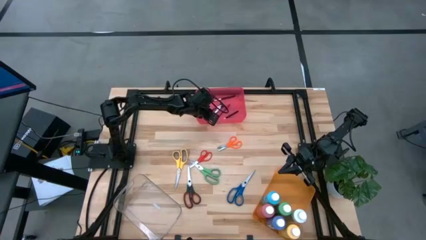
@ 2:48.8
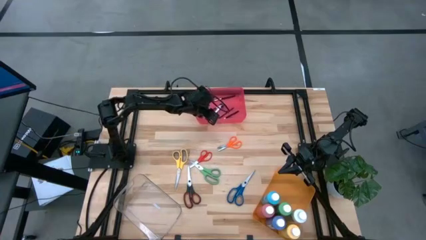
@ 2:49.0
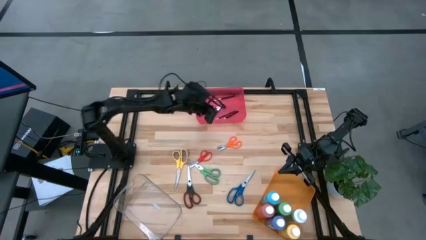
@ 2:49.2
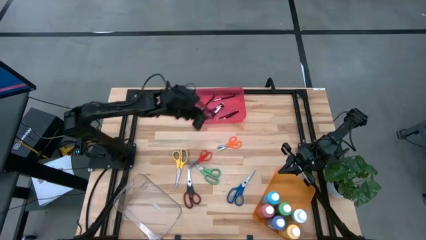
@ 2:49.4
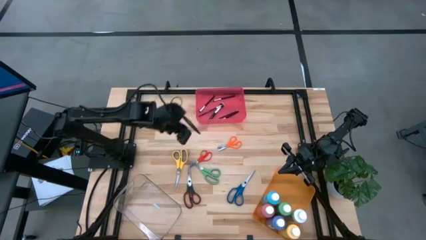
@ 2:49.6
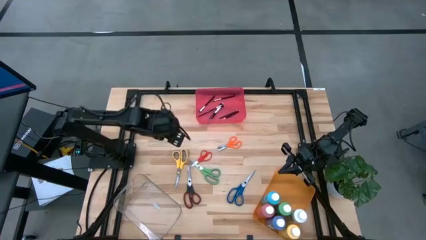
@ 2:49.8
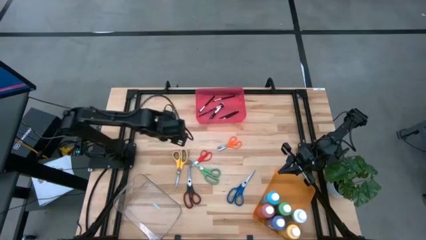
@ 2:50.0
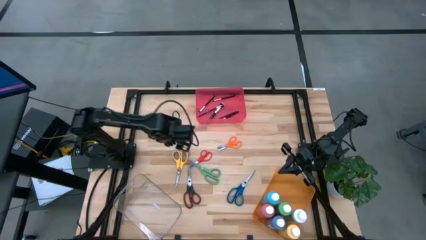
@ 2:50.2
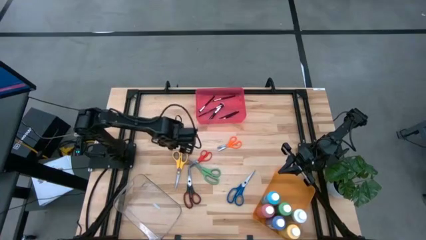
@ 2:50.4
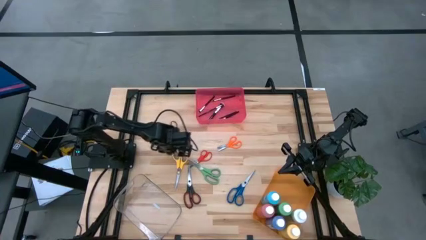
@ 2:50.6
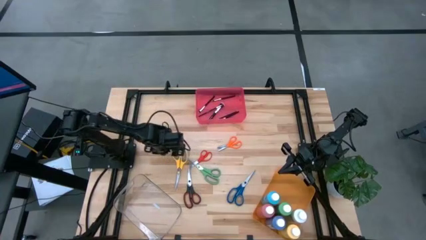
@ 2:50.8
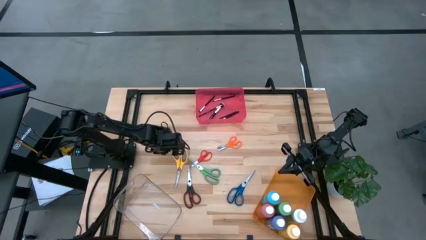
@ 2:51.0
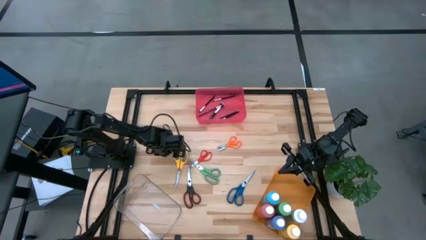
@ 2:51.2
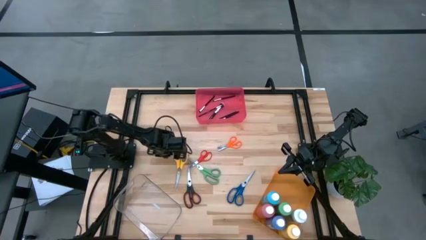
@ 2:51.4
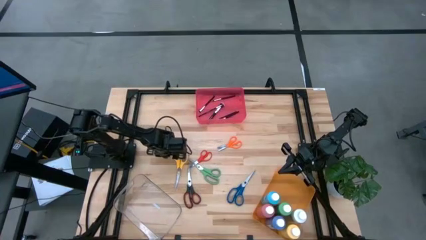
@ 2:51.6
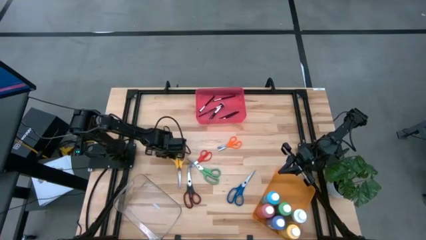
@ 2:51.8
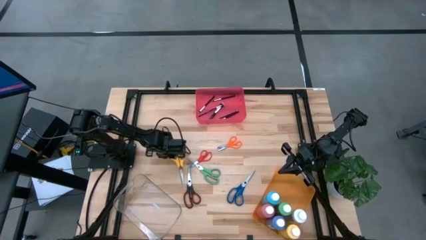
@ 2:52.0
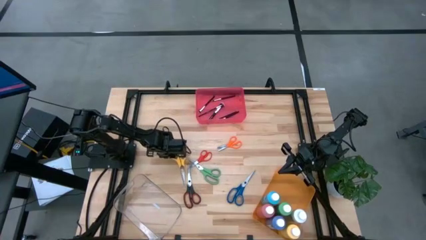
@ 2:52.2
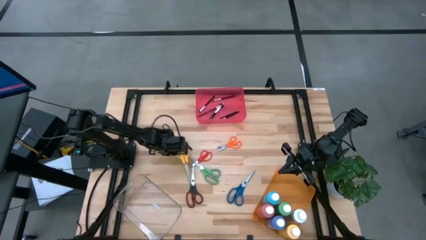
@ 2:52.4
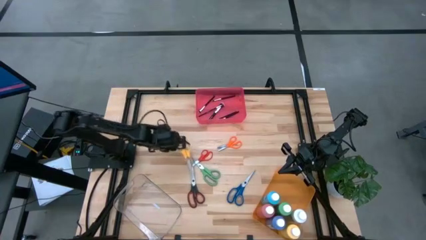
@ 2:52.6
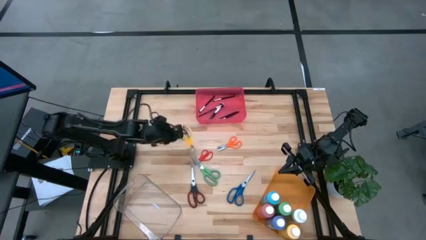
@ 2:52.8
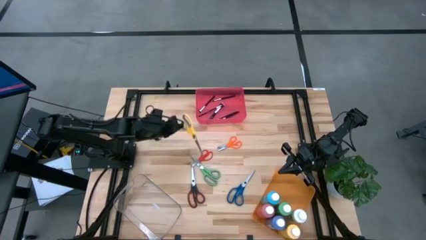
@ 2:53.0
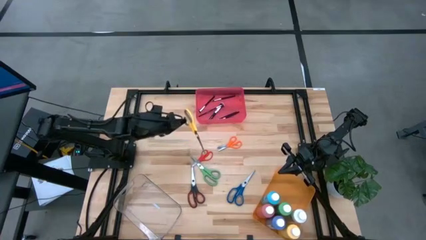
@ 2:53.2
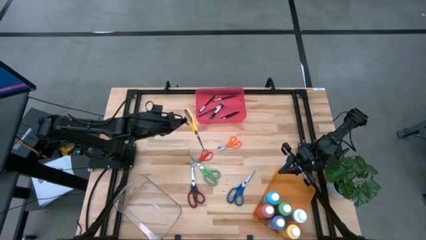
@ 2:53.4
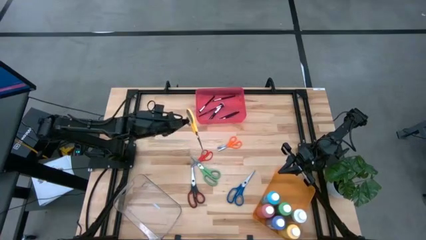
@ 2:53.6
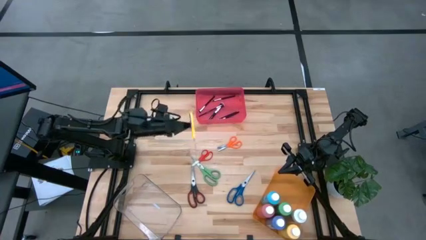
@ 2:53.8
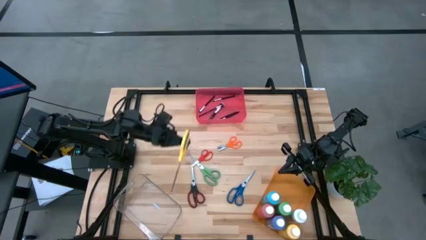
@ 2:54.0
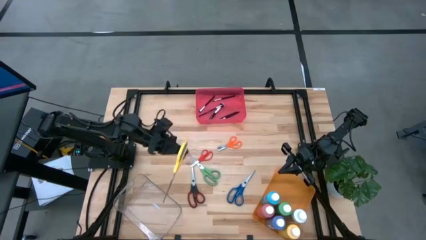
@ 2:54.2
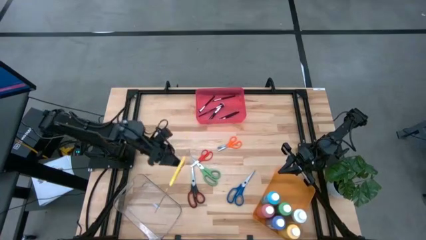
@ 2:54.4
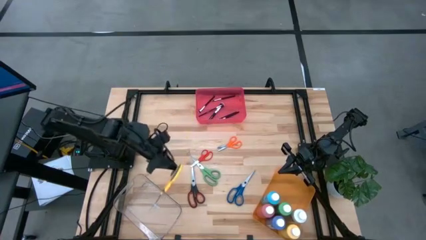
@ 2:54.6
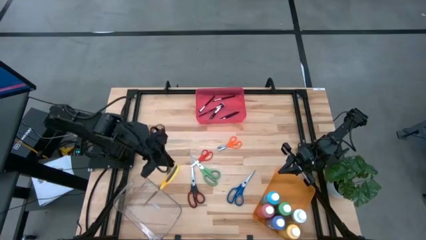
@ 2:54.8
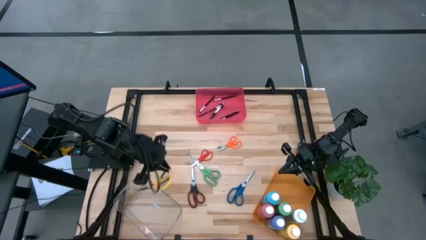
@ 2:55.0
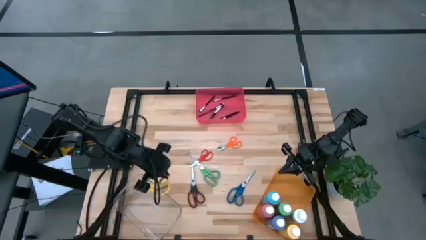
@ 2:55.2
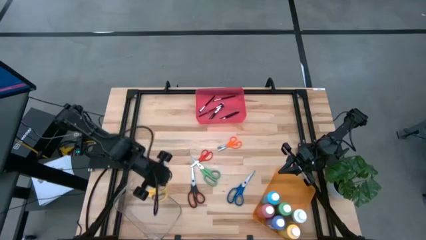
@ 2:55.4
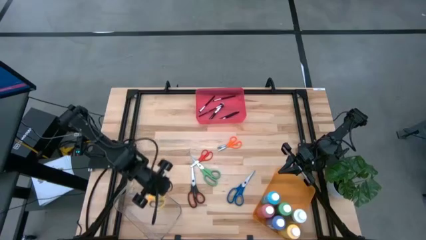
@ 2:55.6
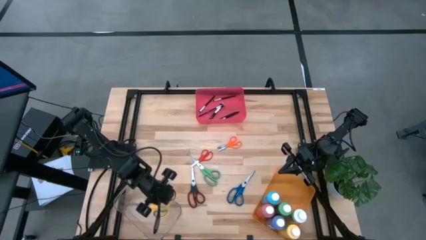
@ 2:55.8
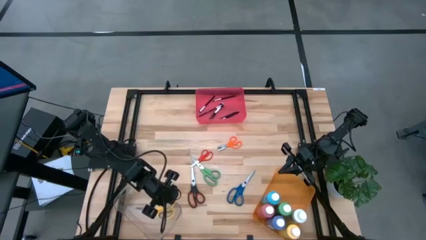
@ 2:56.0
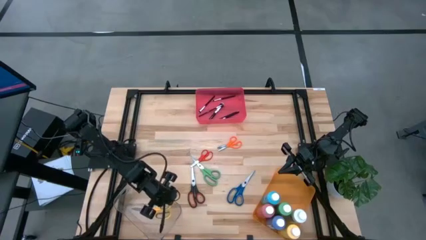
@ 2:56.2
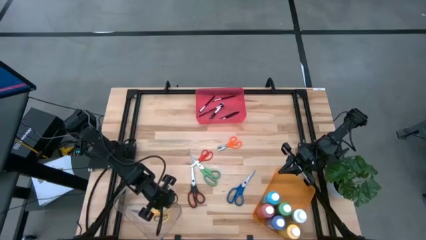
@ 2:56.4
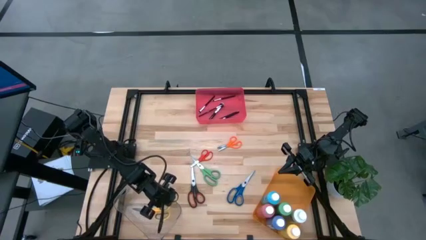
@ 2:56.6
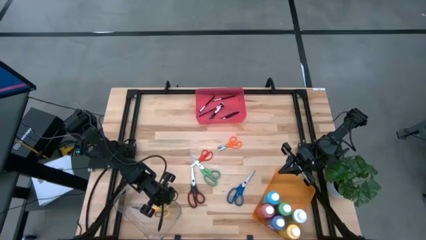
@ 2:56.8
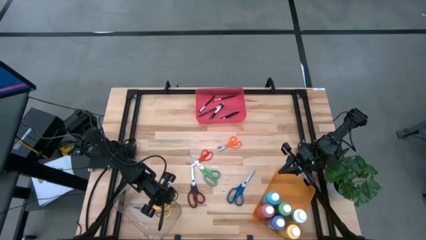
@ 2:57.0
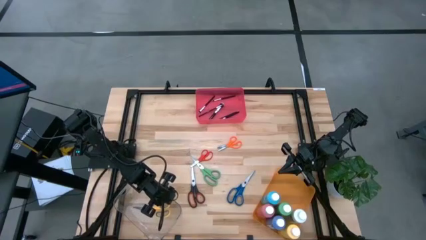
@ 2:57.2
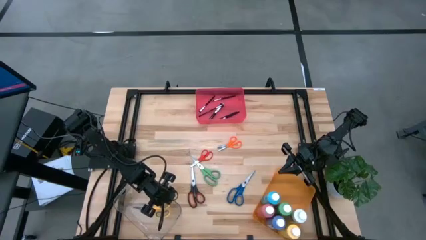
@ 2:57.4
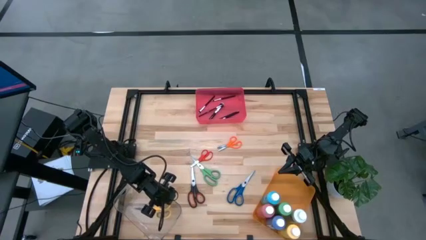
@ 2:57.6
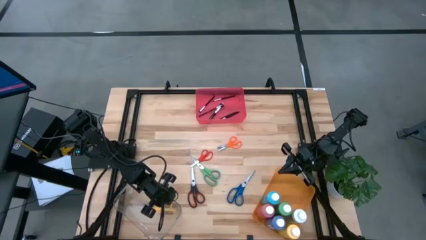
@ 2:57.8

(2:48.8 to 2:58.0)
Task: Pick & Place Paint Supplies
Put the yellow scissors into the transparent bin

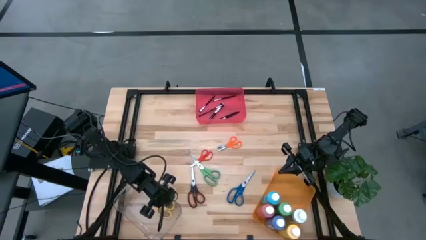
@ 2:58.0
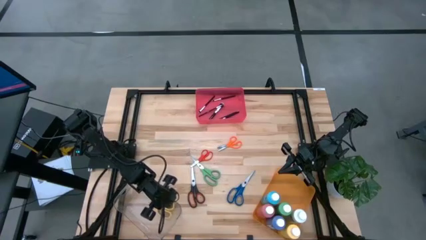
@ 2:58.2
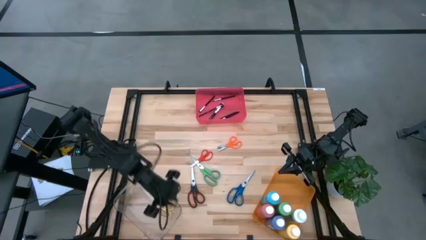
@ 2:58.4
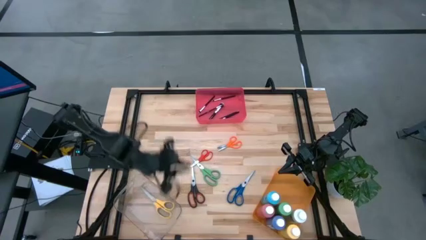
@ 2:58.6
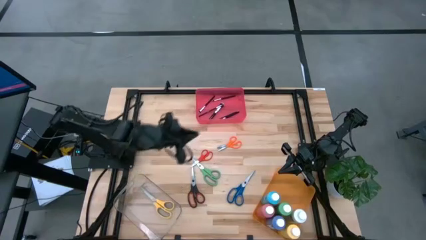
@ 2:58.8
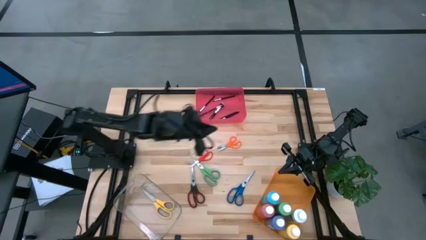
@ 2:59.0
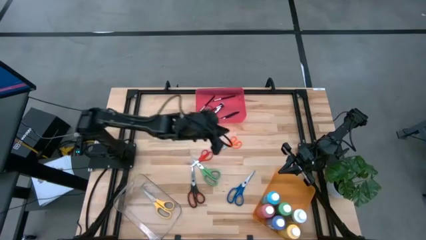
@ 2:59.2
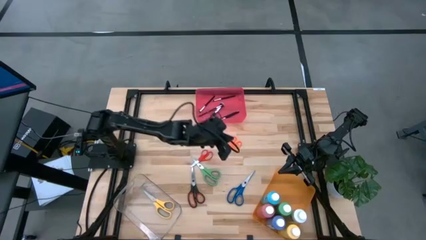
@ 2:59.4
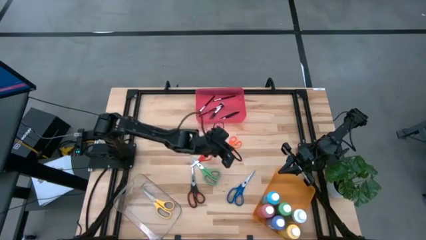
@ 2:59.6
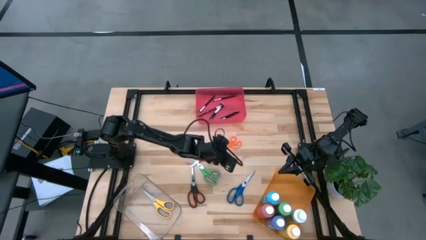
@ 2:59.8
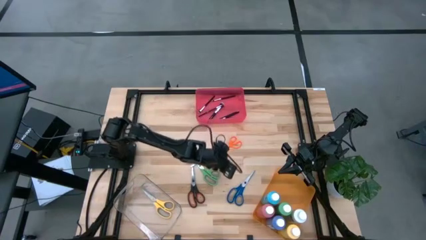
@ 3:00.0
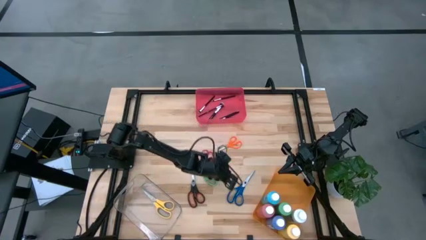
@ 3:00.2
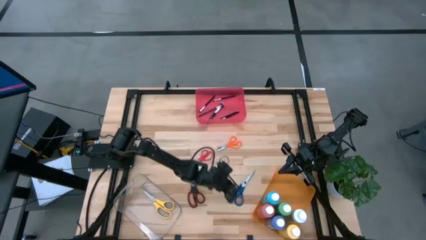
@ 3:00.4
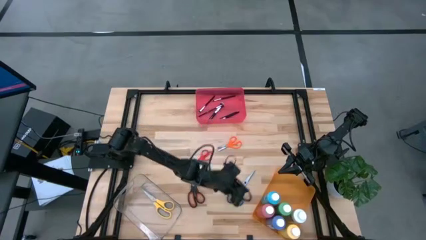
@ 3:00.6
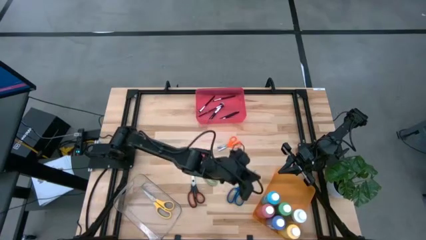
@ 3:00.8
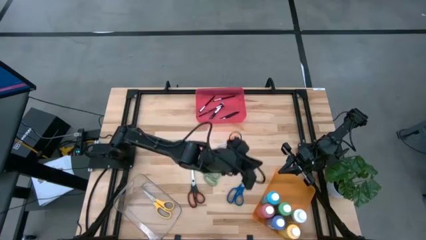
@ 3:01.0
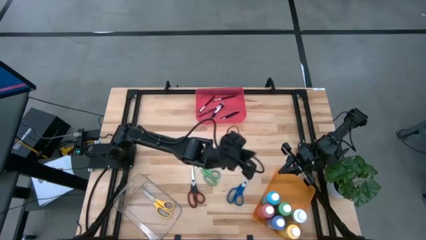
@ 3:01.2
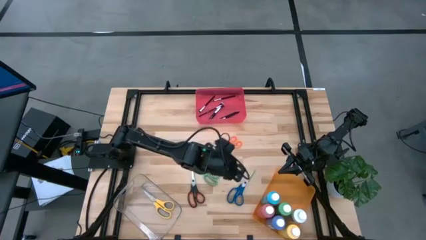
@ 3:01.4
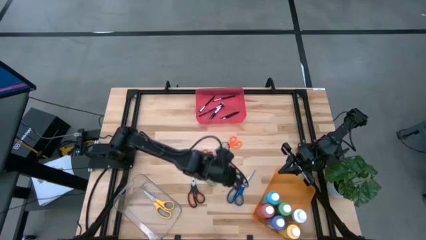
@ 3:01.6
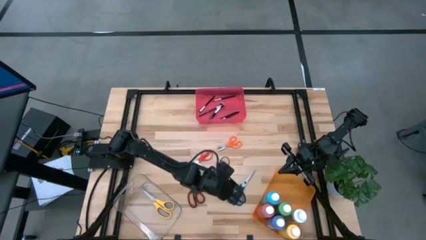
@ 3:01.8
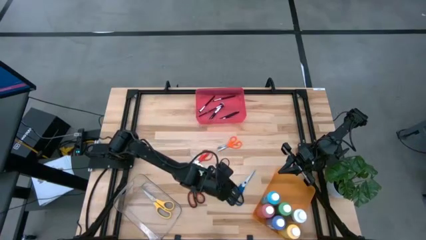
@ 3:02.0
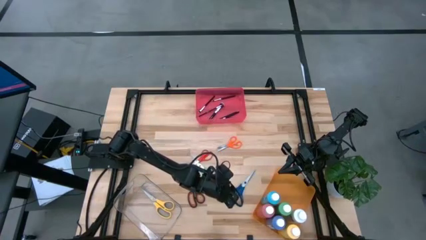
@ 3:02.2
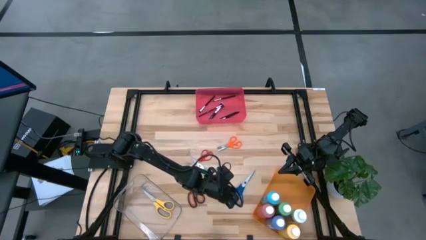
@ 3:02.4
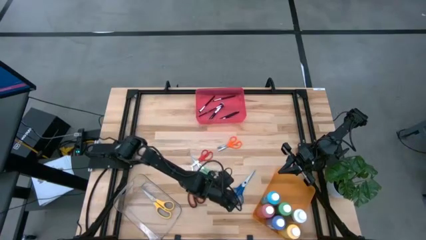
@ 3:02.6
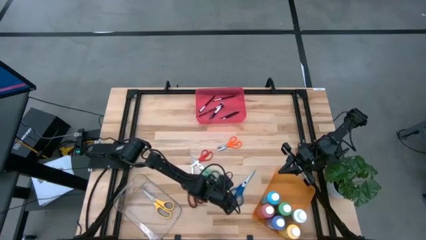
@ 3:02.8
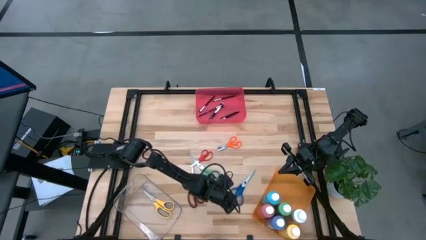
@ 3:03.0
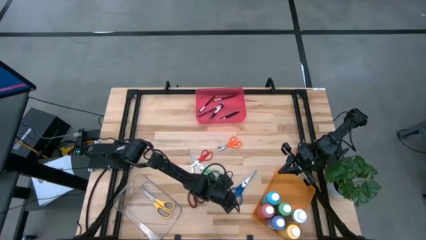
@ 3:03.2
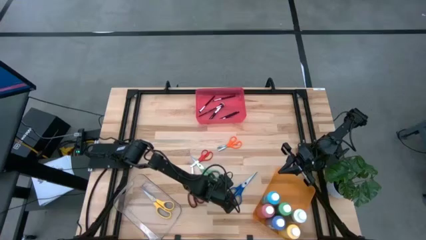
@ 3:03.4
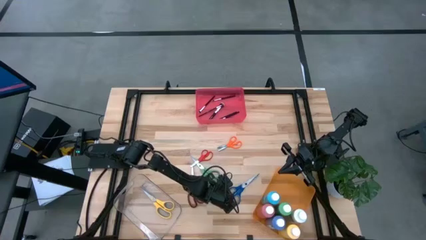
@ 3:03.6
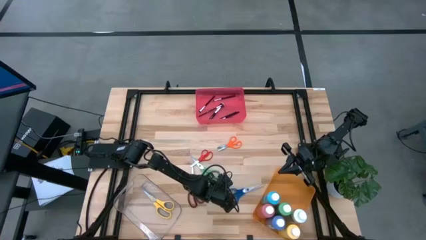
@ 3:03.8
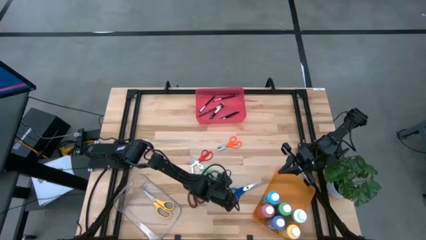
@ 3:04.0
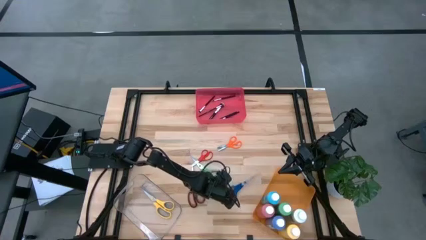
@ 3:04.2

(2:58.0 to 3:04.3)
Put the blue scissors into the transparent bin

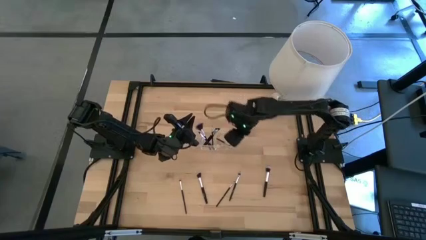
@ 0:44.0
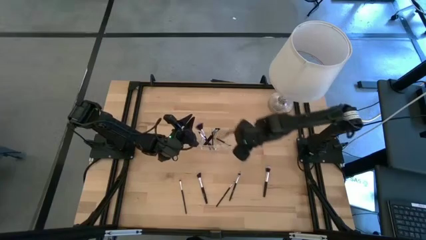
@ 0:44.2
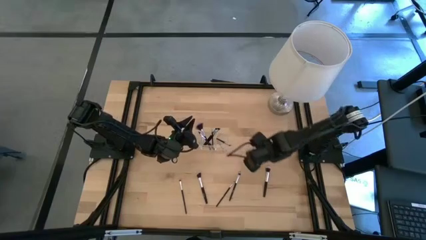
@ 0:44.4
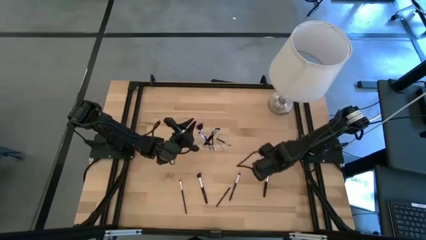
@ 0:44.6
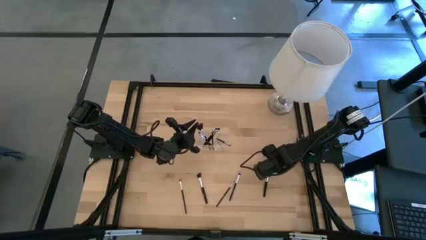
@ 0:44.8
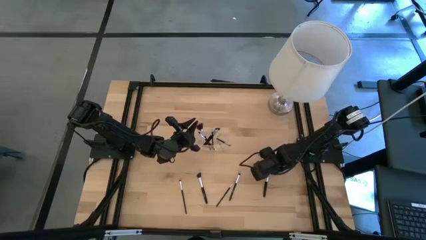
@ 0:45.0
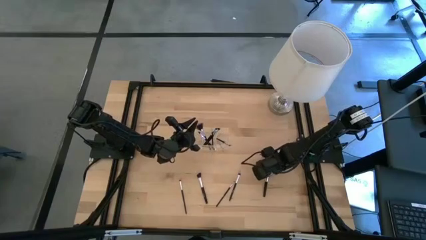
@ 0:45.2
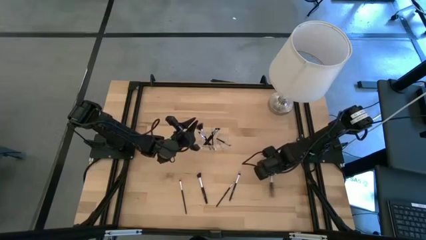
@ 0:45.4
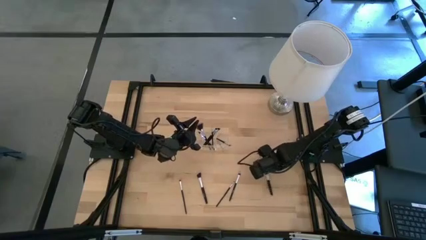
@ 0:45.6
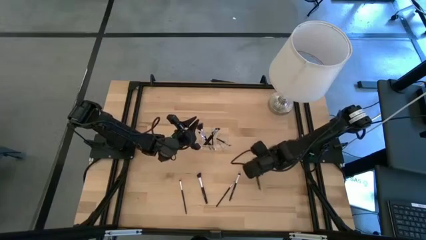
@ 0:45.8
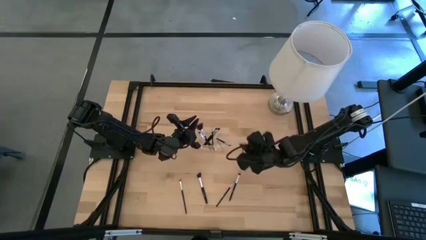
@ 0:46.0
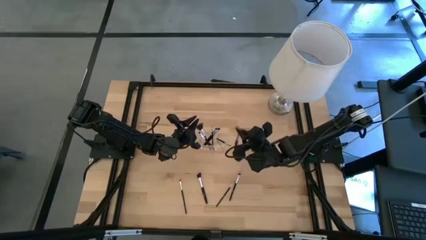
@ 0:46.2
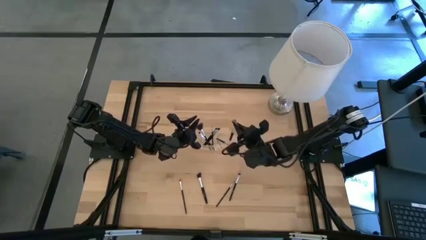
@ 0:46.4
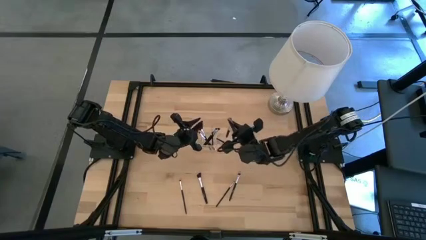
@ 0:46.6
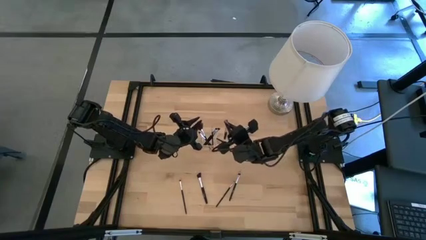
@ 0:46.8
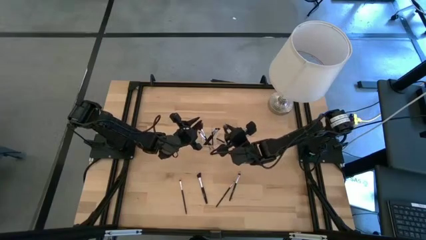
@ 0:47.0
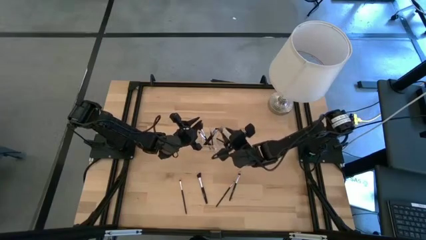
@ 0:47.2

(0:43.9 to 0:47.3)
Task: Put items in baskets/containers
Put the powder brush into the transparent organizer
